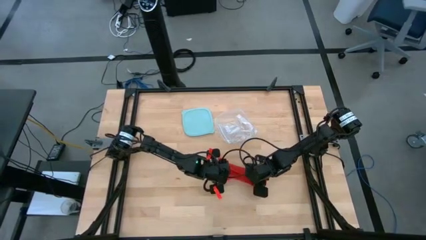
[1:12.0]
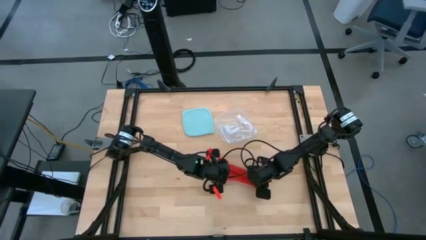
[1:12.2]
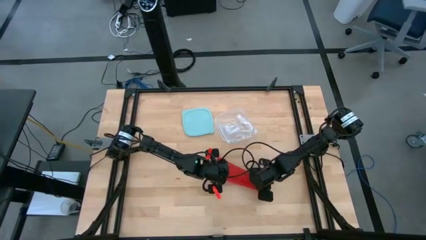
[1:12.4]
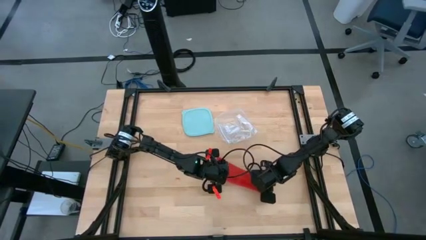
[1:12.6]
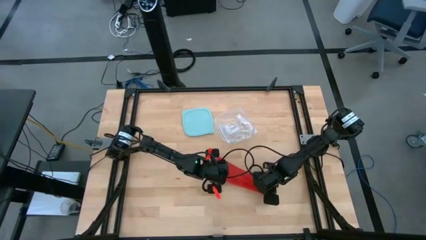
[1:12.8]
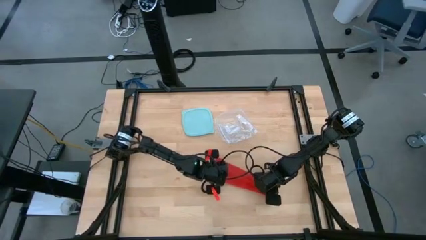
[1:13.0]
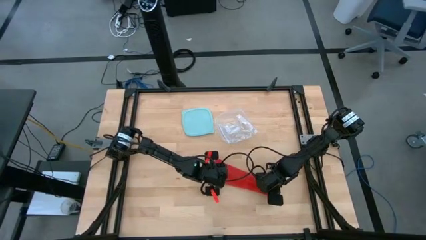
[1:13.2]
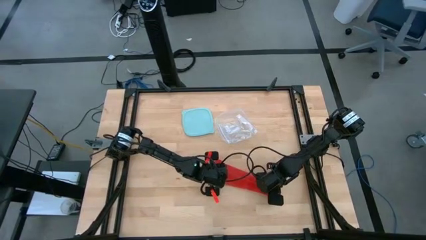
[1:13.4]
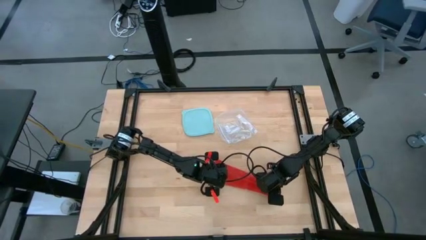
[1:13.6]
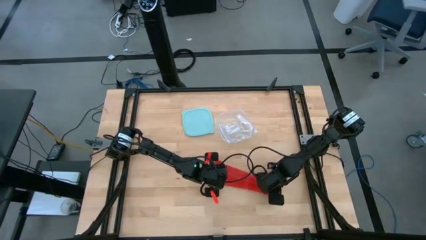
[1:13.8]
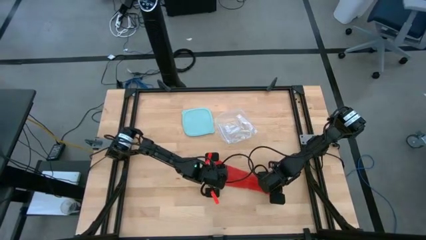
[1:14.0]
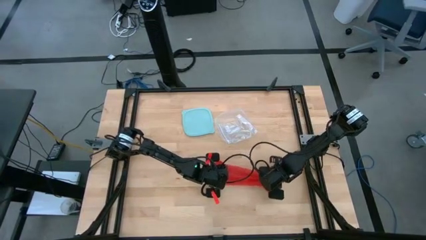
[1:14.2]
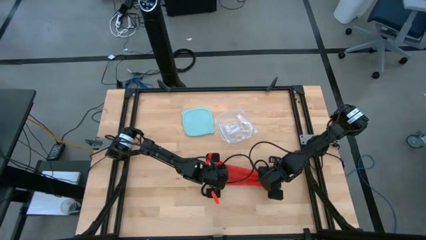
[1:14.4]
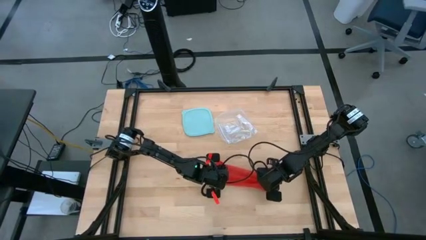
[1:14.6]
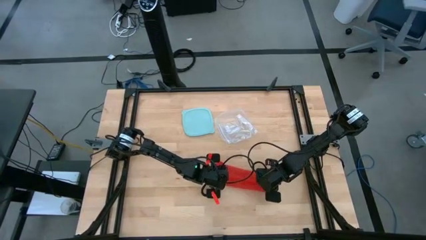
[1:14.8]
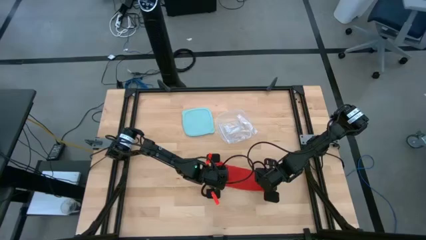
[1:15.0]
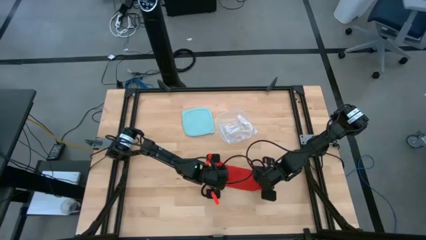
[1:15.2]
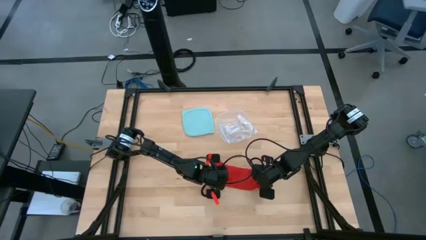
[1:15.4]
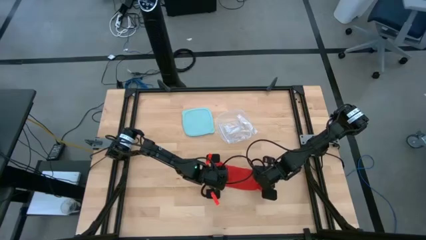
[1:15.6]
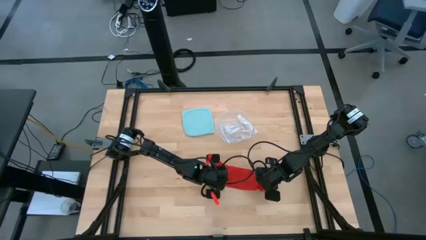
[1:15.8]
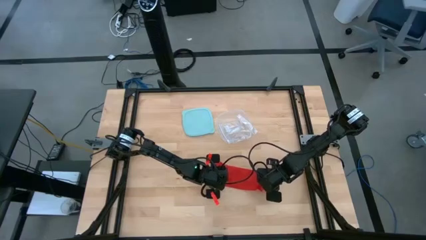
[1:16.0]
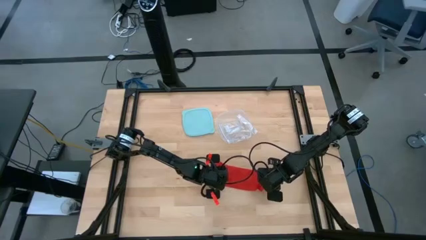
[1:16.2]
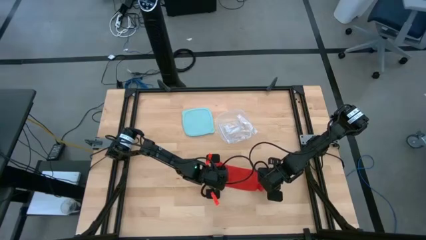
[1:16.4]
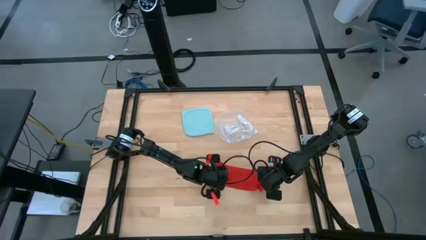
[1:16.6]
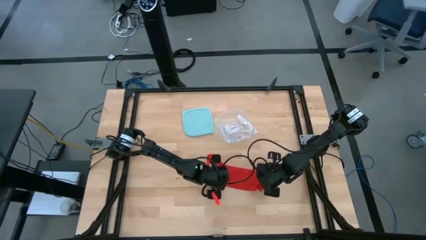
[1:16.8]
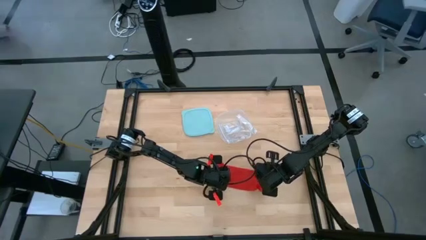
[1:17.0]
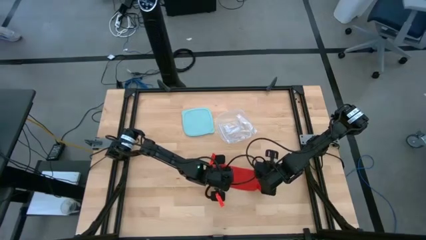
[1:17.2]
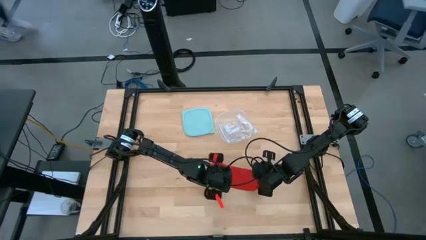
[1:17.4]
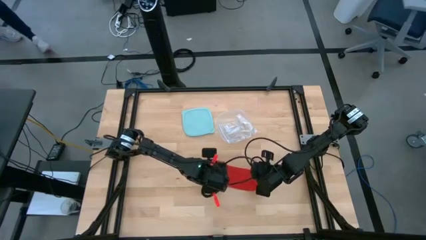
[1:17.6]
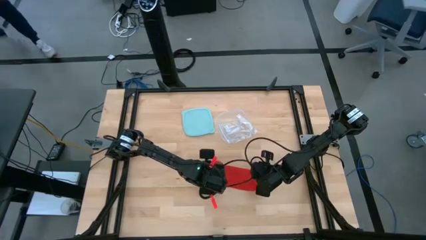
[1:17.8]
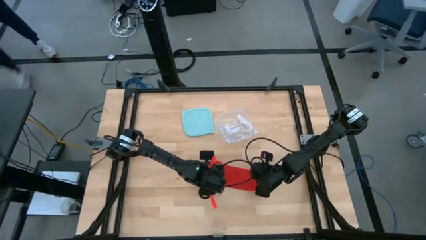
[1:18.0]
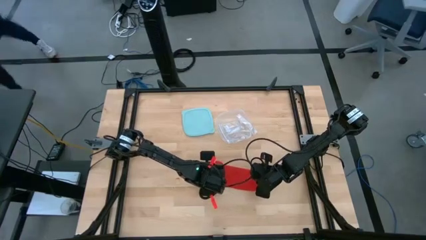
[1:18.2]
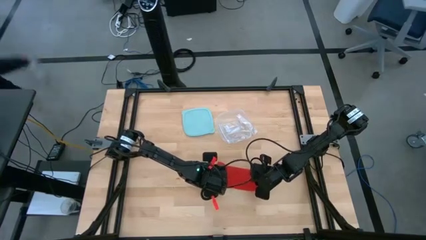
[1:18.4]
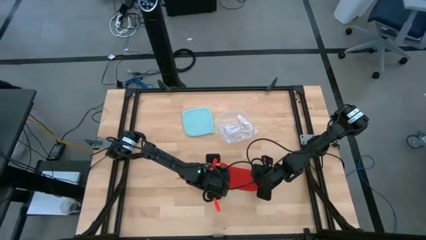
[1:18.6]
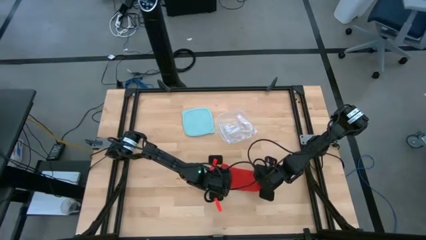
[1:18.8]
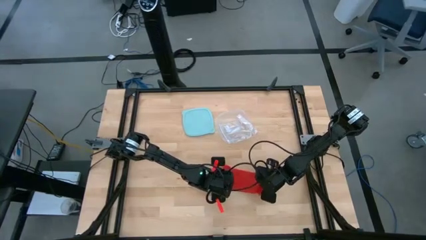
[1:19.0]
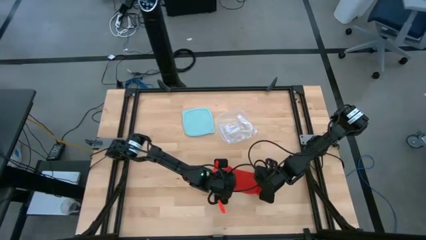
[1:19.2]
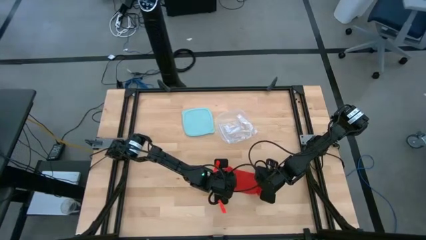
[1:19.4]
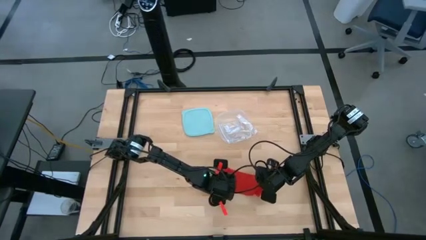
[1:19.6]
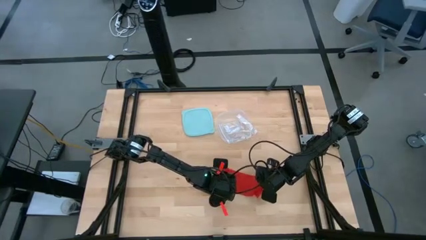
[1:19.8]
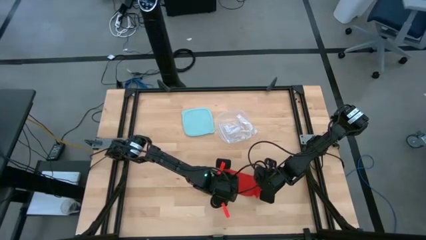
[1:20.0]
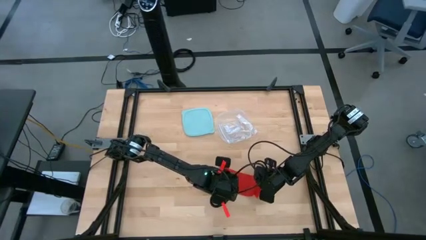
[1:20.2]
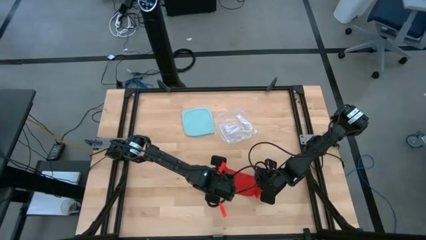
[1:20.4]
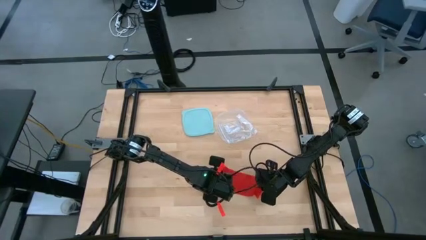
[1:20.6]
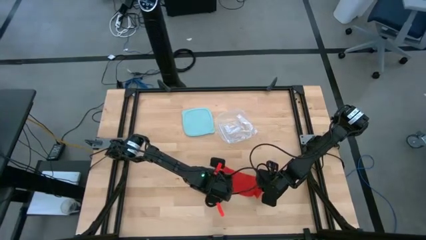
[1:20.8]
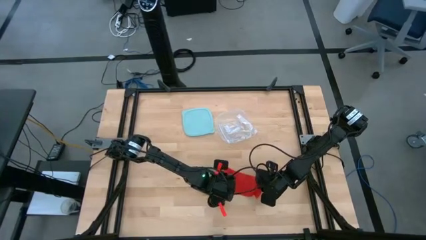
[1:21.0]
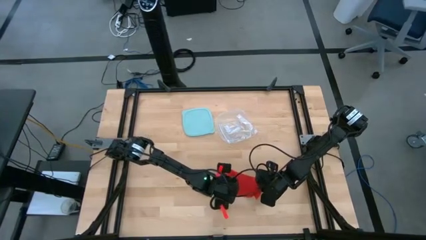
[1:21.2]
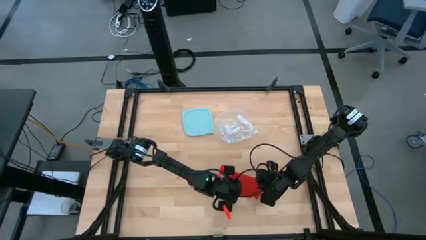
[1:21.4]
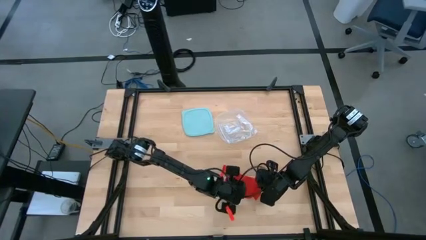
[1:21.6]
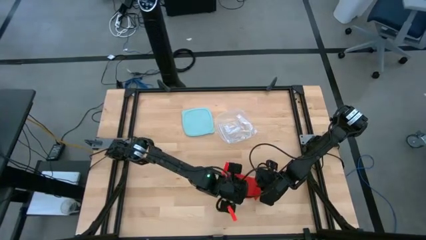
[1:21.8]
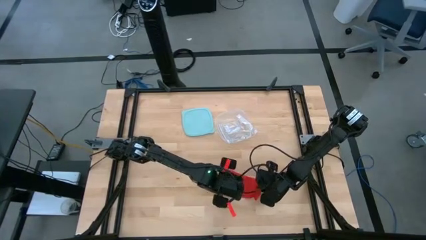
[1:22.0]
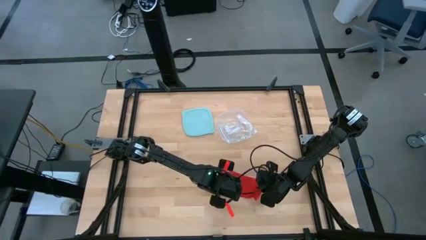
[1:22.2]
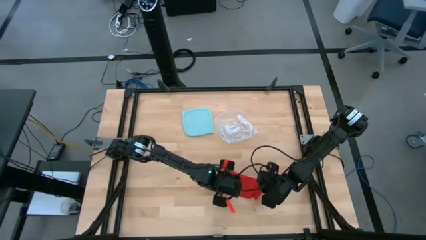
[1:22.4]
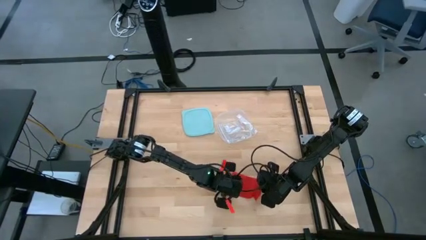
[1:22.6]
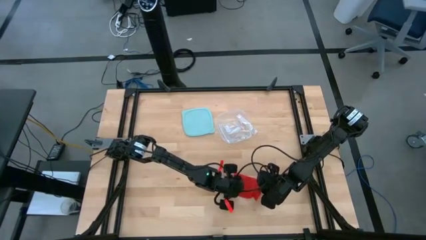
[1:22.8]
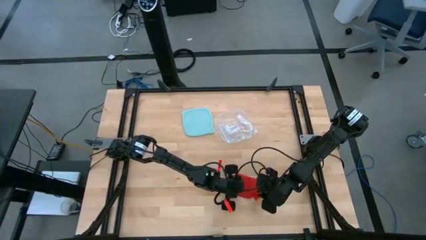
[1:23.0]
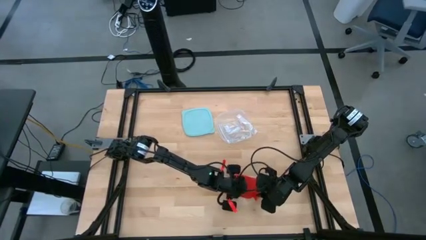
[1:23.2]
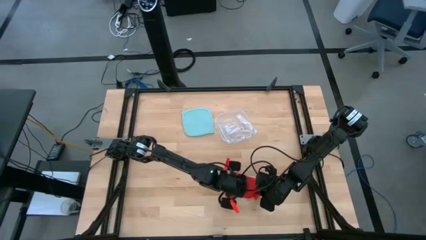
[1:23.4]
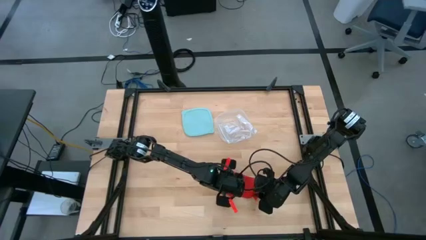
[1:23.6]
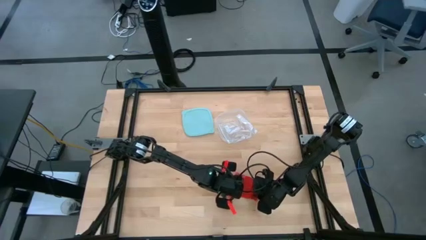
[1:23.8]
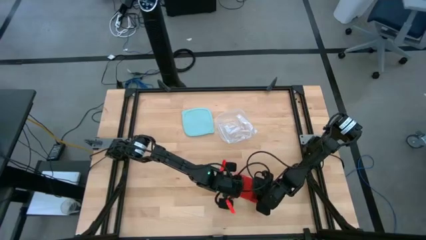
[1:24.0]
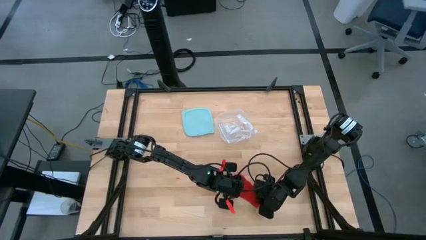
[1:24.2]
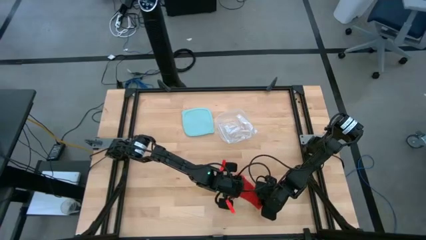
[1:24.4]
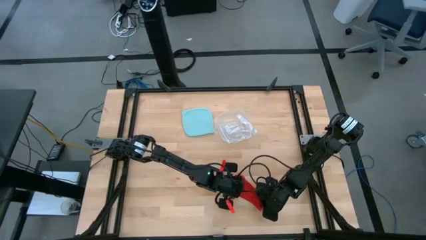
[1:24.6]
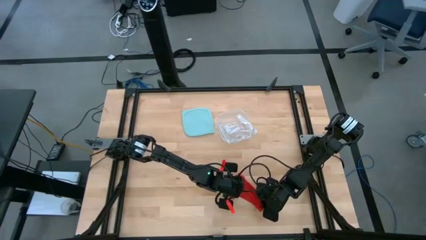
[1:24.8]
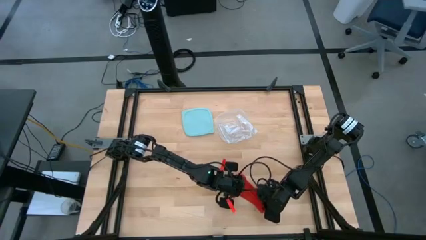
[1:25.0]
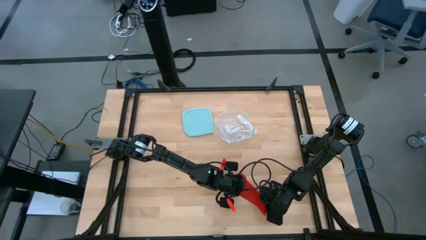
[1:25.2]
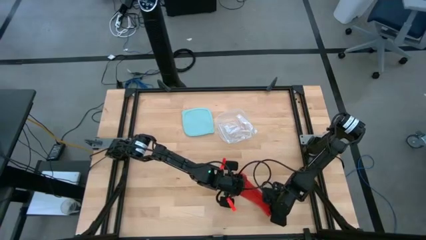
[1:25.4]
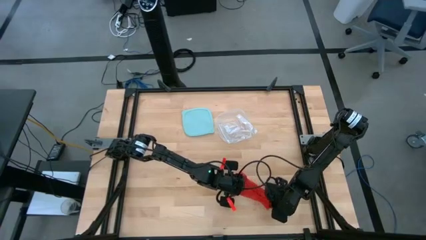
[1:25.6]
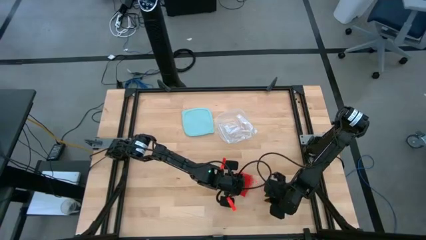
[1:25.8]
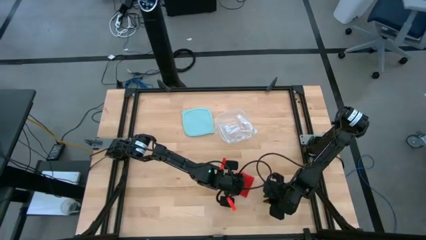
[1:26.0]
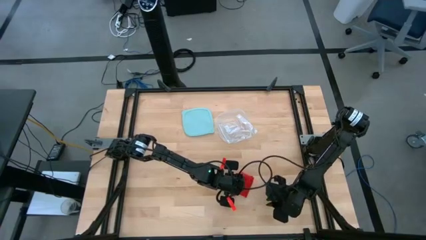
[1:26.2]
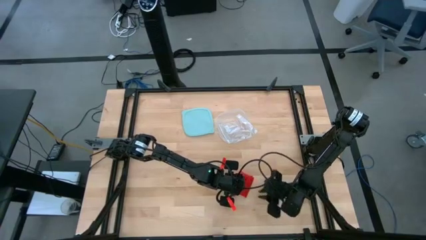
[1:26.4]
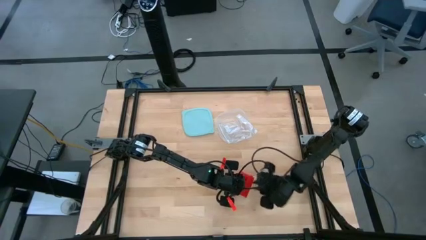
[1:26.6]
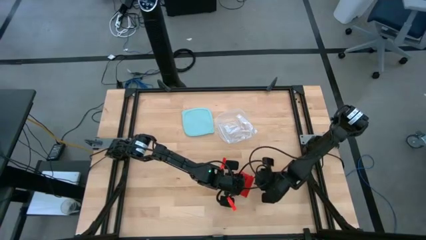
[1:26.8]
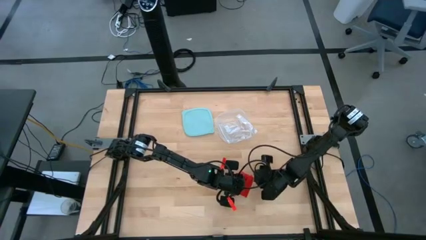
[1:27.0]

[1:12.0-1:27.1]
Task: Roll bandage
Roll the red bandage

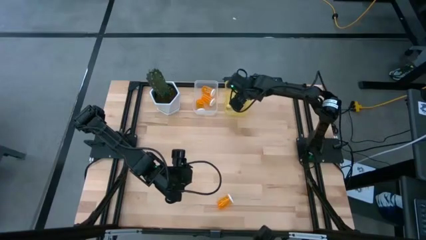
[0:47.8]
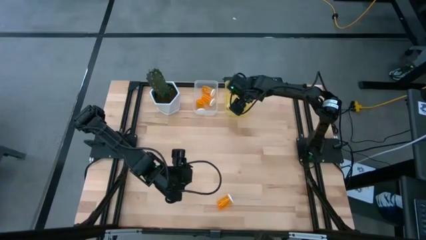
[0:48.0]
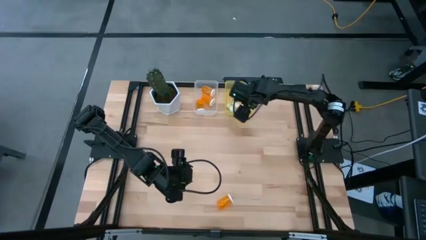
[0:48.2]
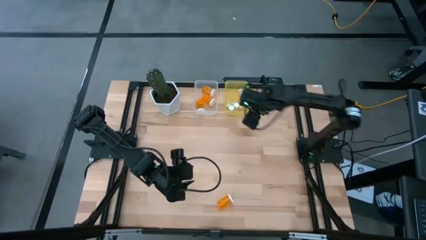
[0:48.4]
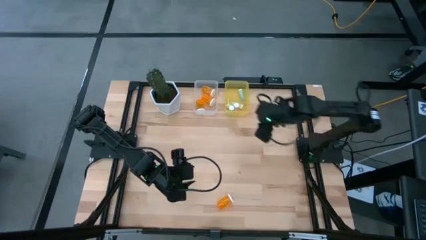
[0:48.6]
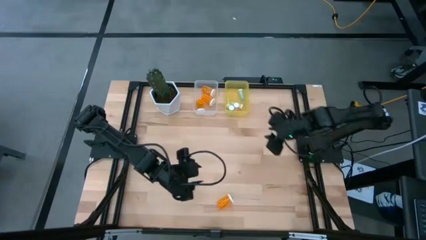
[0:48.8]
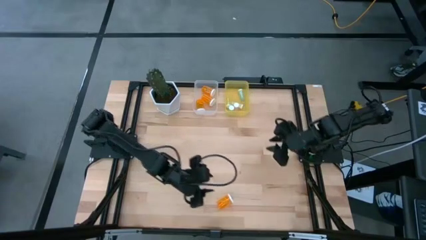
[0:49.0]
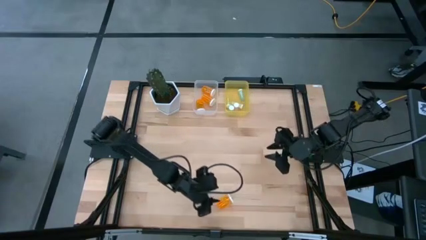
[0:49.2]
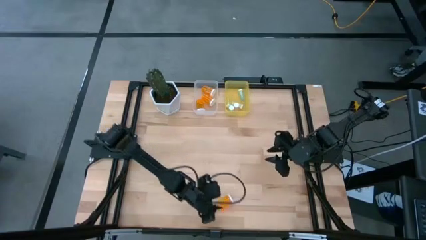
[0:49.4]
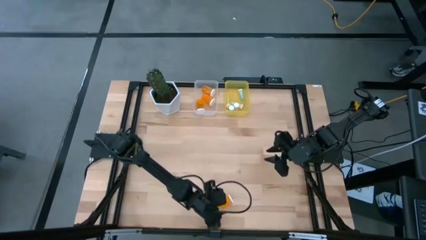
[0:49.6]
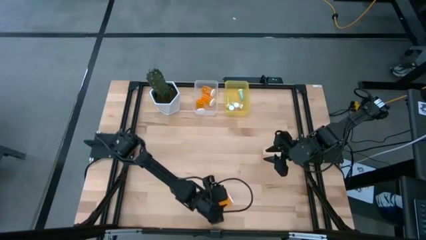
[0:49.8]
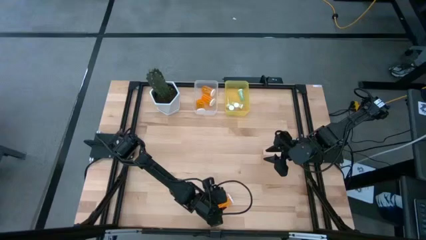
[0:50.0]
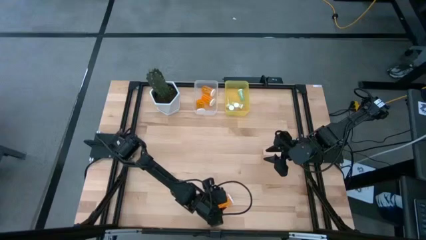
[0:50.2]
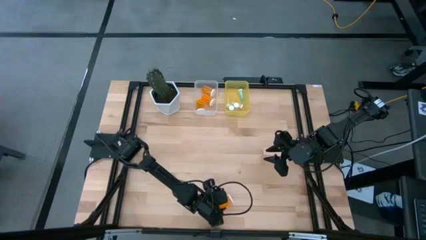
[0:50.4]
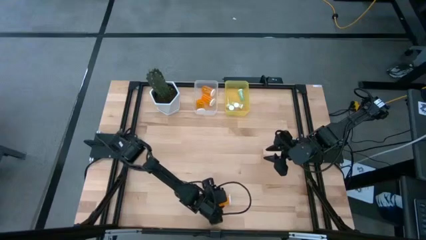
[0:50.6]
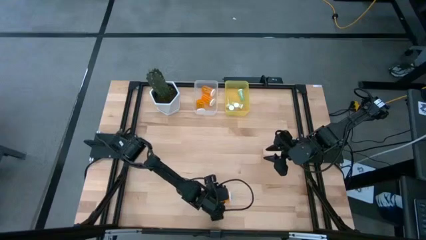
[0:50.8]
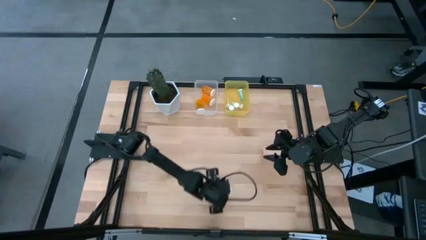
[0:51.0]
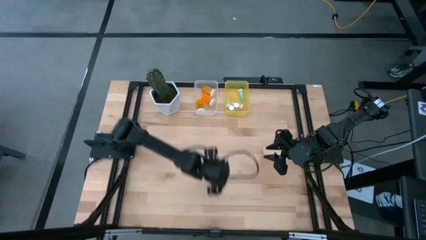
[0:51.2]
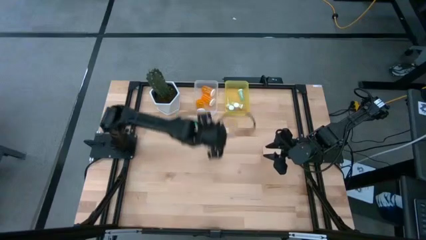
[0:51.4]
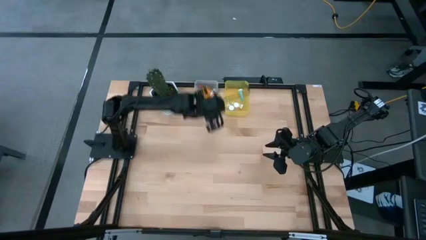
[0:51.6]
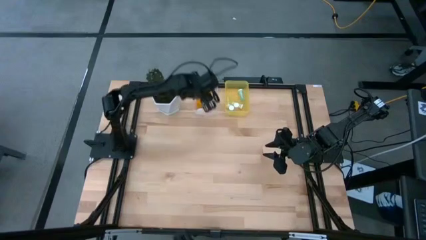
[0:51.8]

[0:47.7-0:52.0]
Task: Pick and place medicine bottles into bin by pill shape (circle, oval)
Put the orange pill bottle into the white bin
